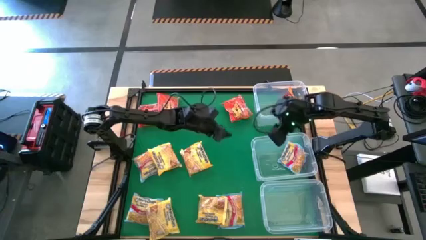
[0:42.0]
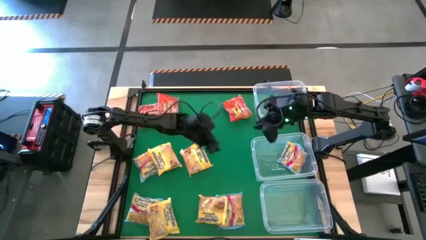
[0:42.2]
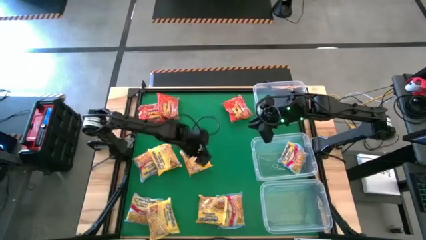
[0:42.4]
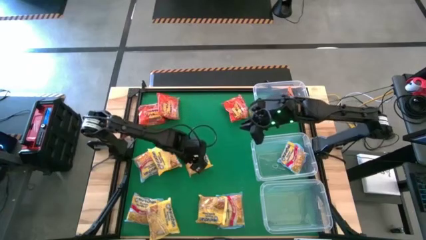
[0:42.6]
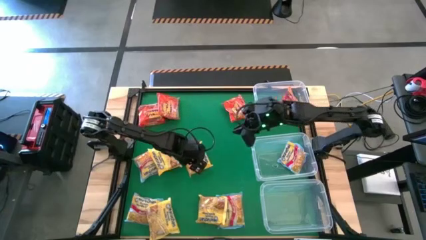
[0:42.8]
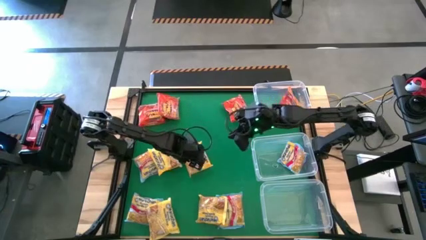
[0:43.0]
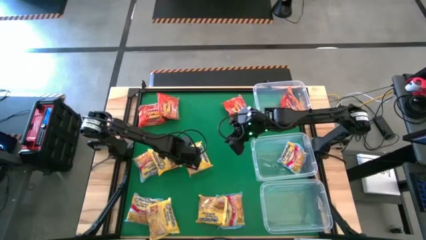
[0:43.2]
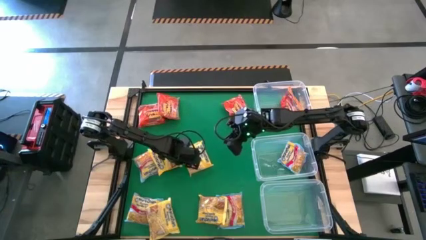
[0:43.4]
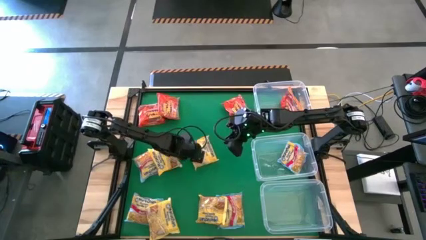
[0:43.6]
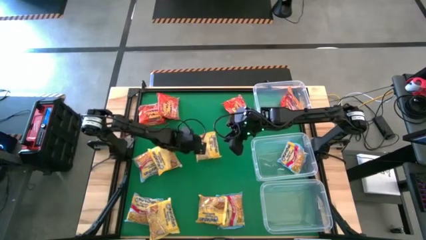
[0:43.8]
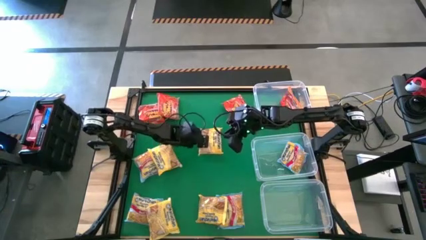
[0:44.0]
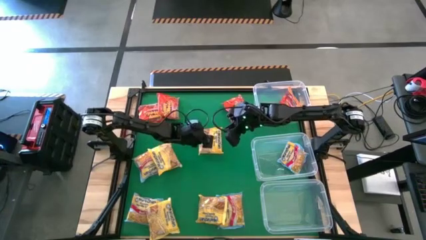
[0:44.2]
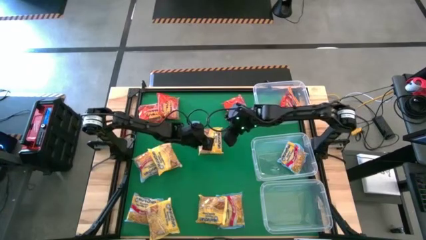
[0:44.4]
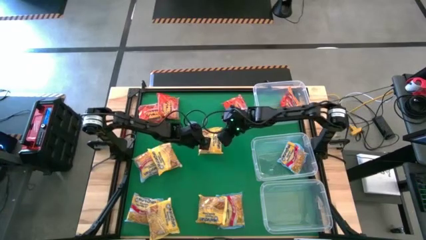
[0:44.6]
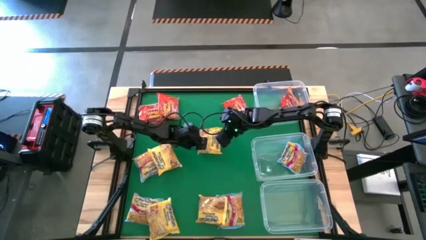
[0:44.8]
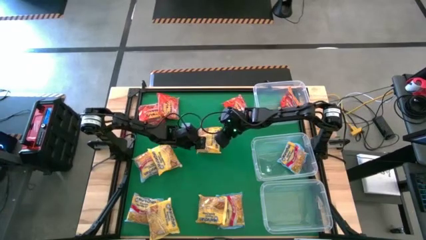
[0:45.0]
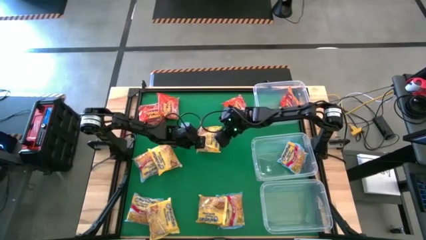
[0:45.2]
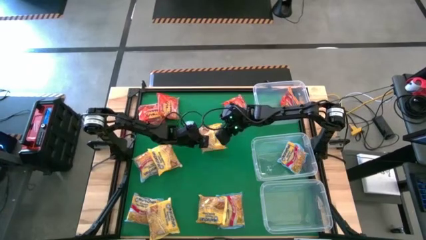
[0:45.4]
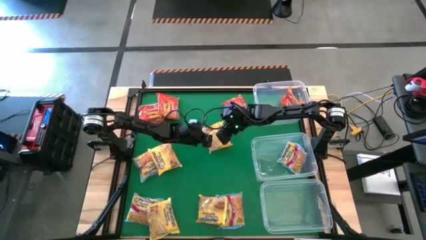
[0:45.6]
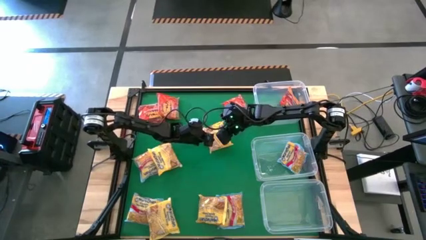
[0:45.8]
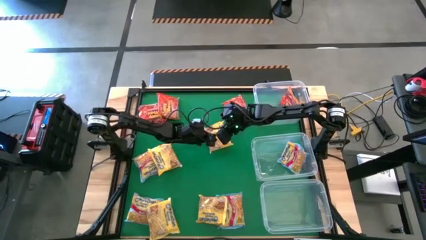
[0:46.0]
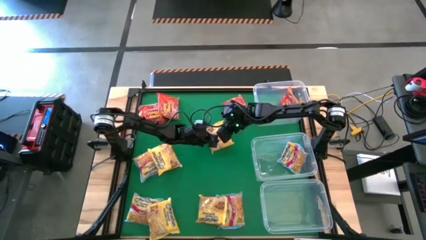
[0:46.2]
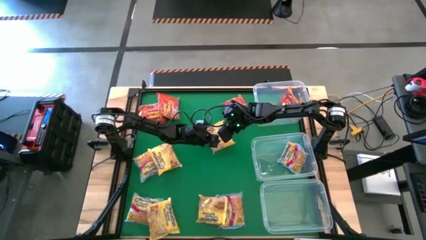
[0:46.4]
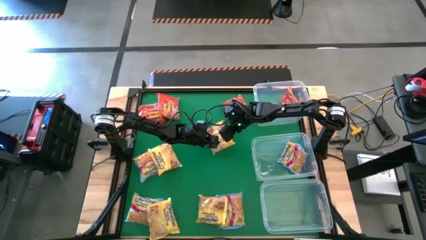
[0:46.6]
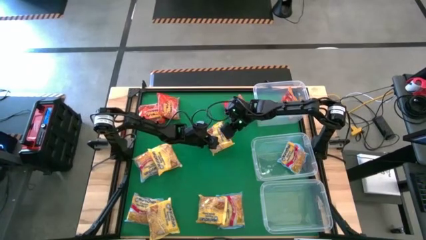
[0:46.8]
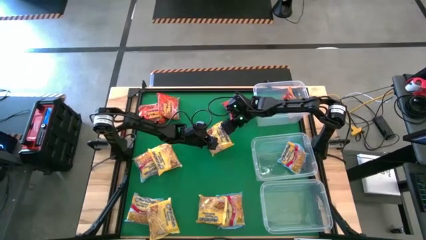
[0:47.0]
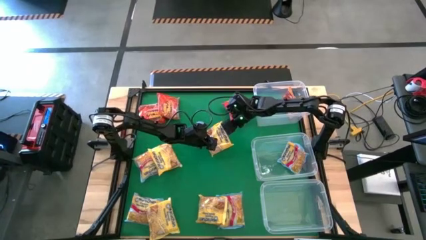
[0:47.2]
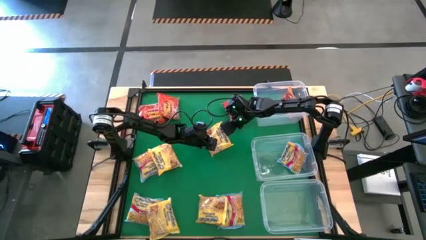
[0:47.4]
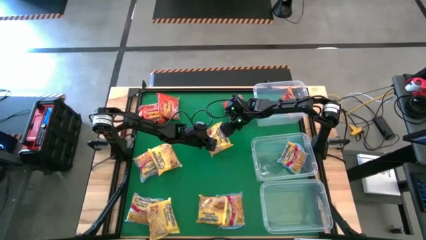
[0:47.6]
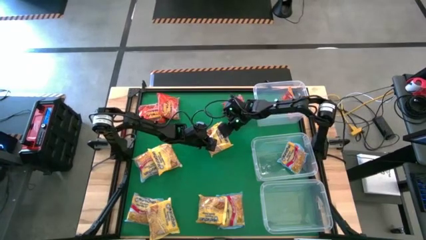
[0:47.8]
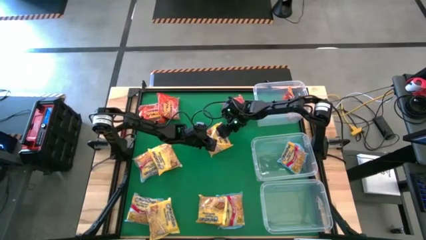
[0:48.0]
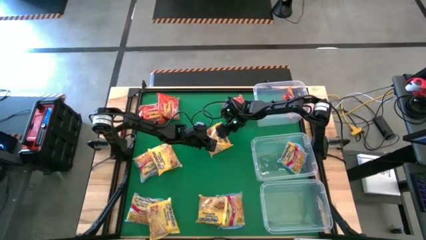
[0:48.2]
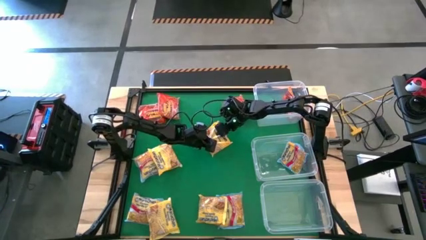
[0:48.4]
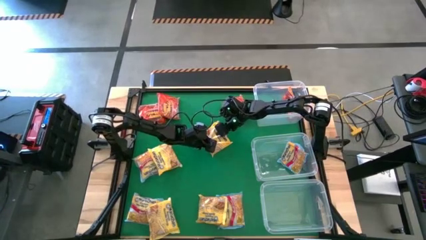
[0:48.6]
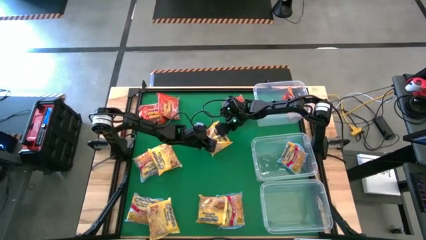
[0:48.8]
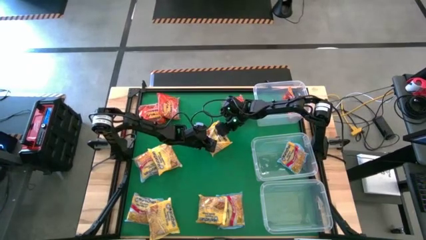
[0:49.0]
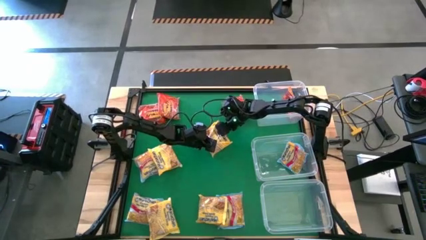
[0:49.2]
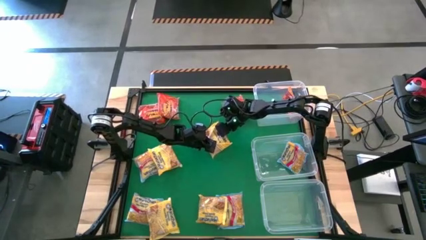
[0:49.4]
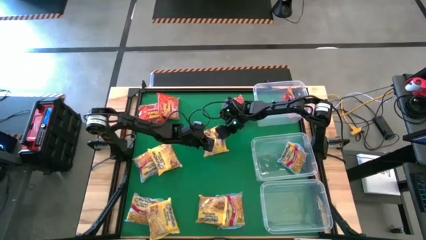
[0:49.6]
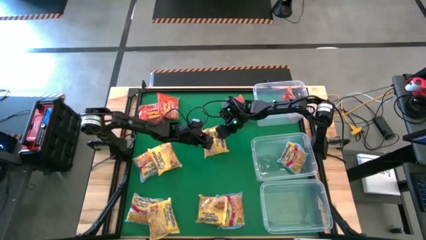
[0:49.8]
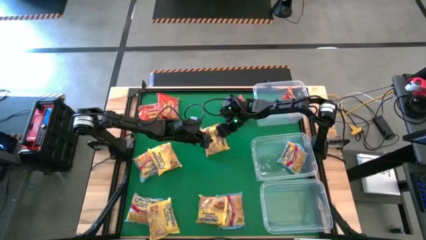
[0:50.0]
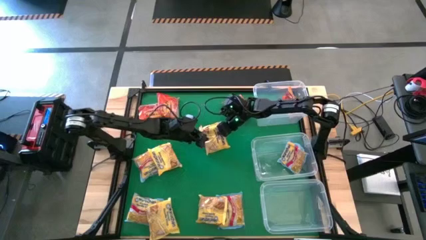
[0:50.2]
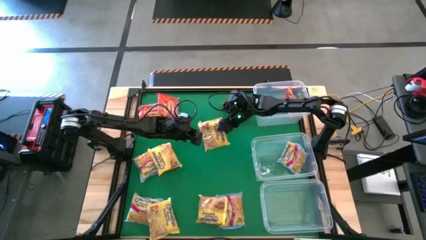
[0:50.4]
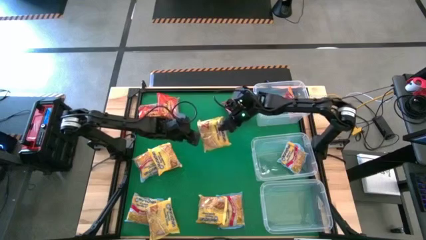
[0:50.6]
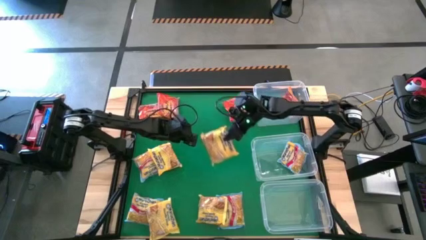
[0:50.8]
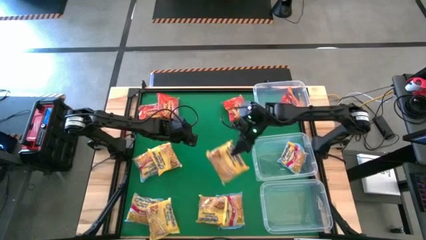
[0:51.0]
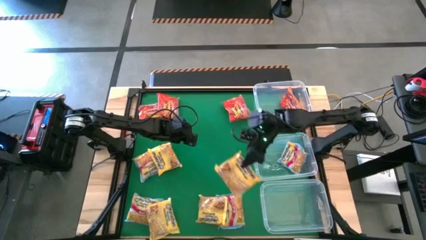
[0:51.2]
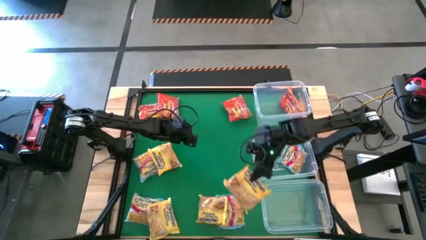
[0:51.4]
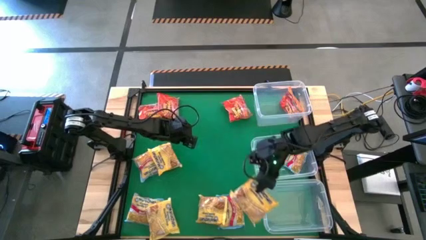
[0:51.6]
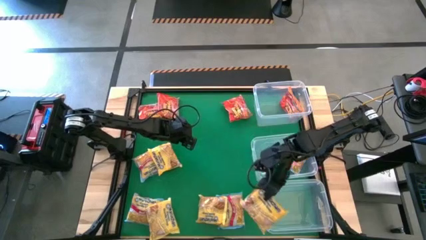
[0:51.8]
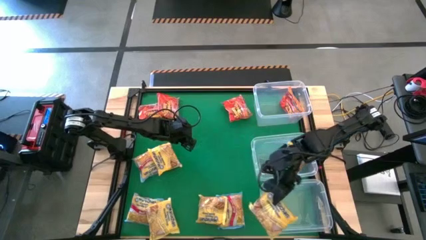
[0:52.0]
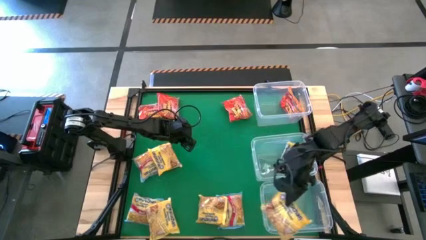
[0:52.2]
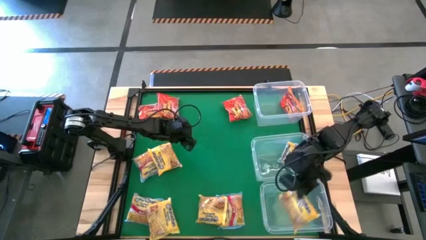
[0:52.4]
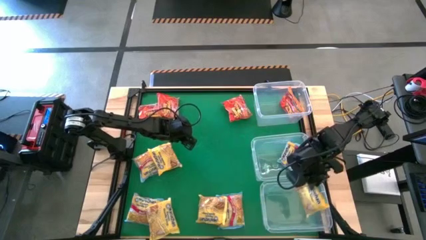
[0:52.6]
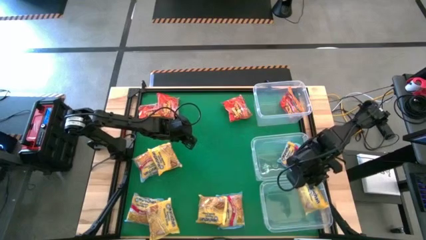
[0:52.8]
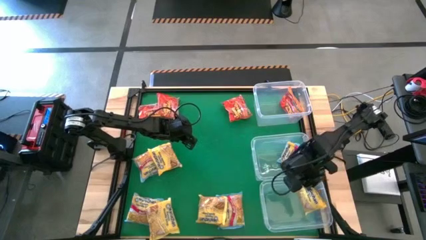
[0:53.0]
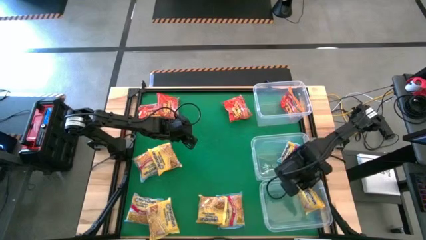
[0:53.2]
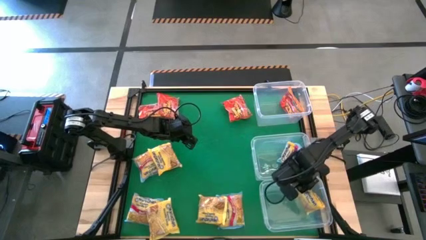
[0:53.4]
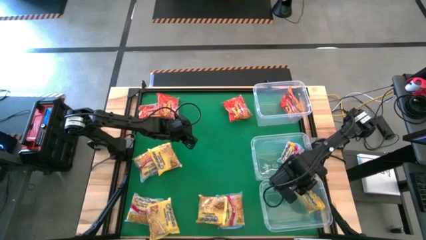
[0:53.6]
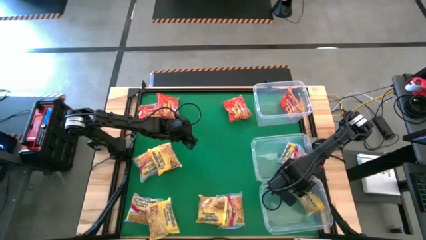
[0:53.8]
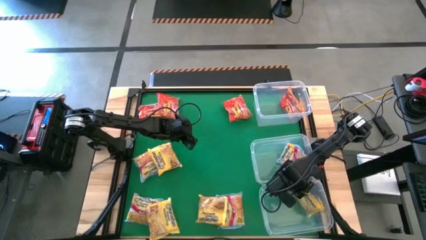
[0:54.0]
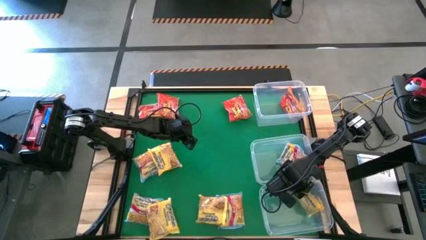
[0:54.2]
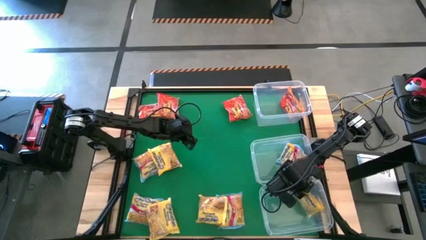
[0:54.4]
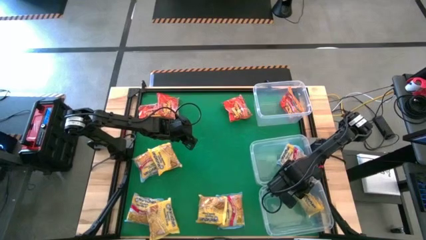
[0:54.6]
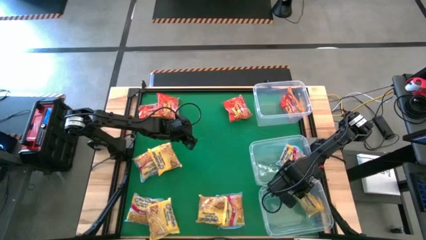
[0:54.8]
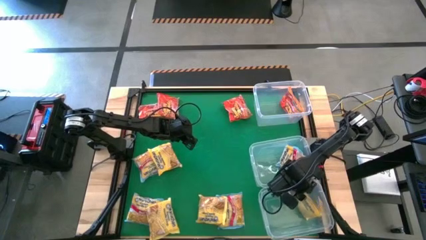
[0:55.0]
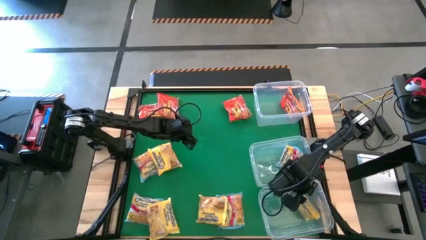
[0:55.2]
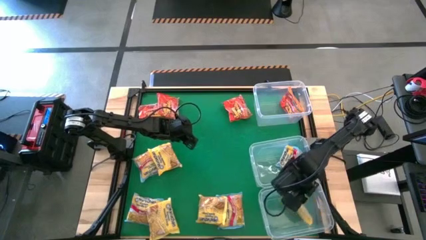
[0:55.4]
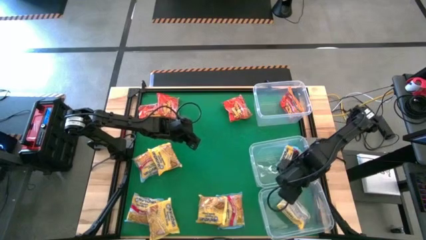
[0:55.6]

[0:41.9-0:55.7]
Task: Sort Maruchan noodles
Put the middle right yellow noodle pack into the bottom transparent bin

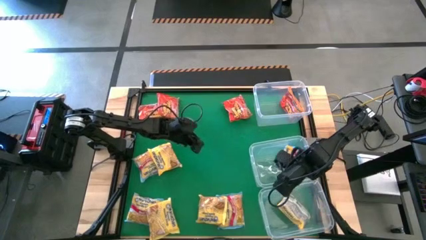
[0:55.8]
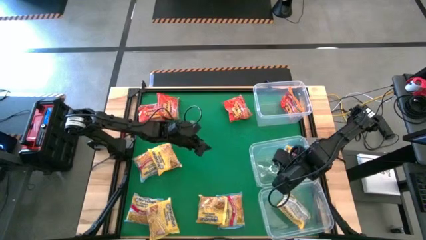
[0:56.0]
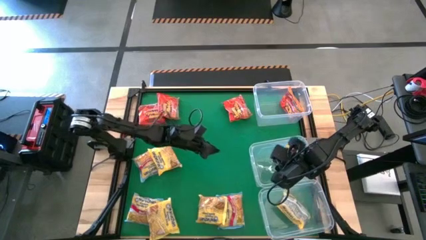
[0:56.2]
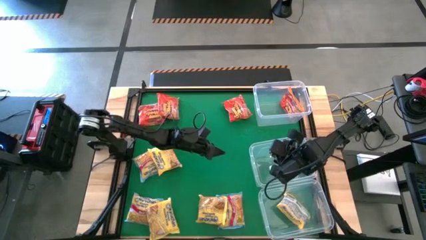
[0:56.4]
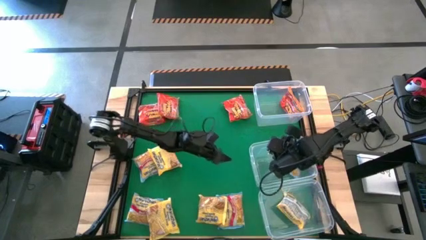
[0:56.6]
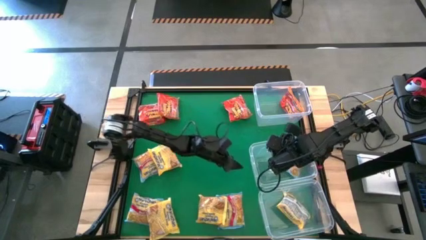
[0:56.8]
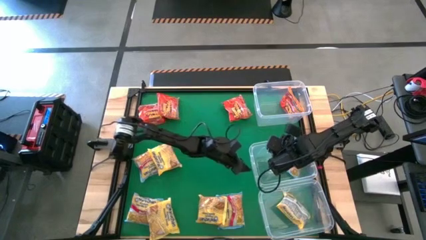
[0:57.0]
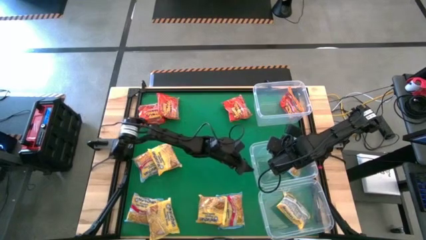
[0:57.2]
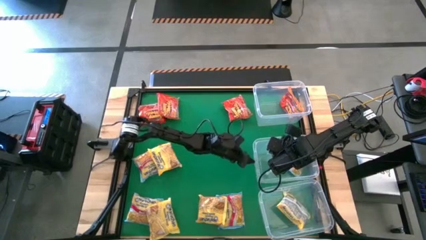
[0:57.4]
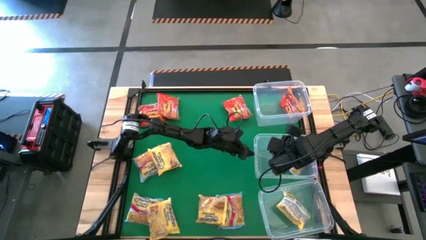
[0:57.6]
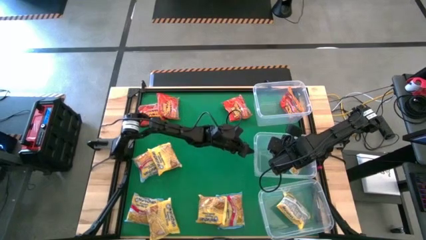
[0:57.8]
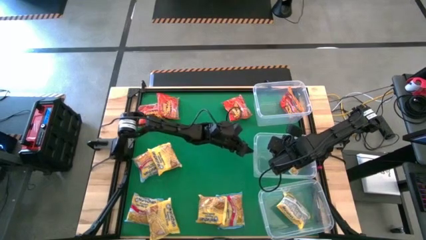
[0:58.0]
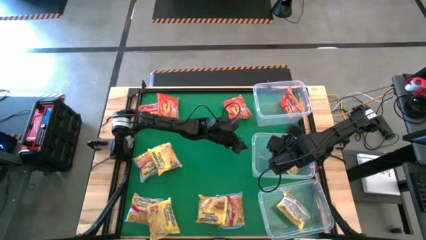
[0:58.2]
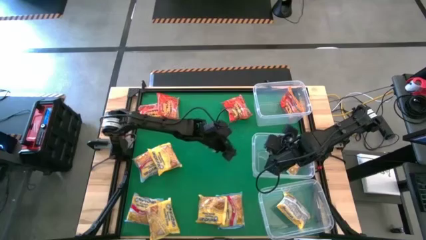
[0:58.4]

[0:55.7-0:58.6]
Adjust the middle transparent bin
